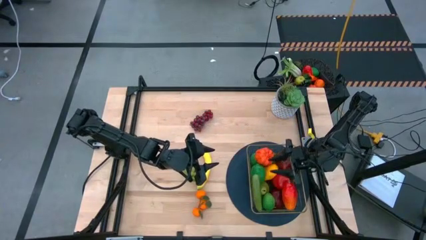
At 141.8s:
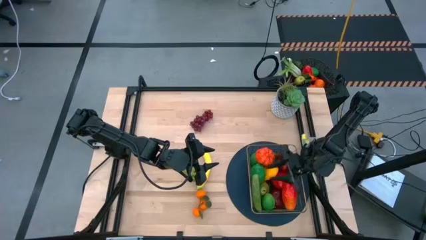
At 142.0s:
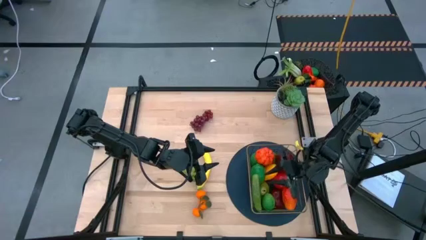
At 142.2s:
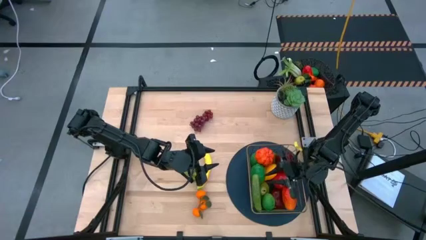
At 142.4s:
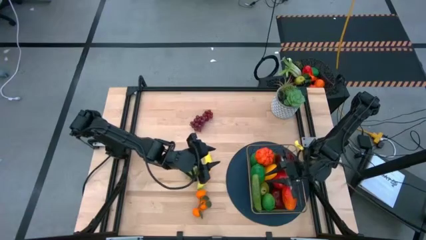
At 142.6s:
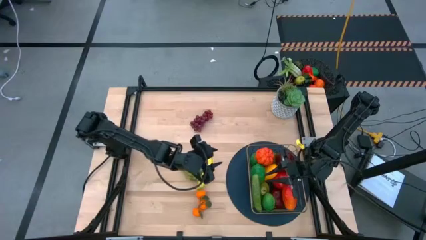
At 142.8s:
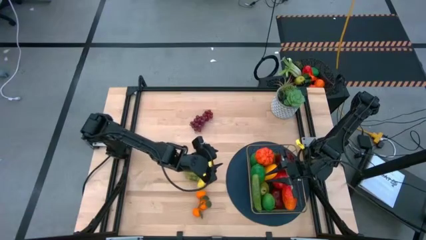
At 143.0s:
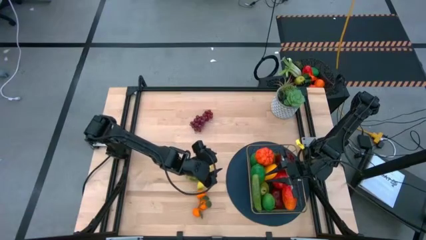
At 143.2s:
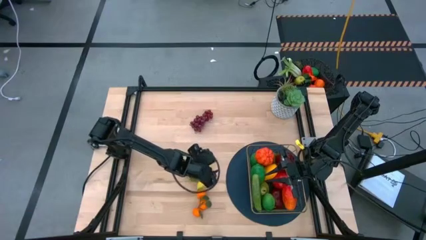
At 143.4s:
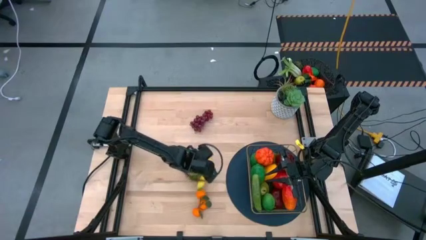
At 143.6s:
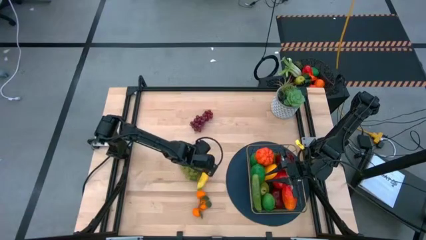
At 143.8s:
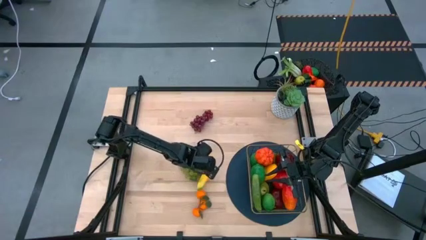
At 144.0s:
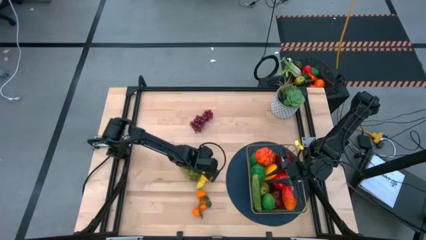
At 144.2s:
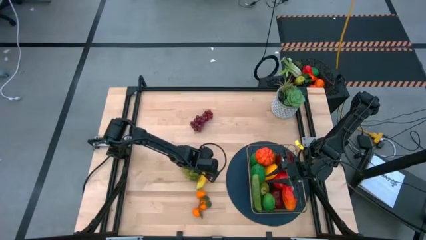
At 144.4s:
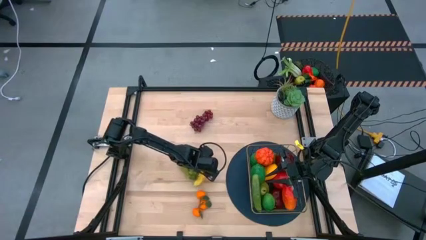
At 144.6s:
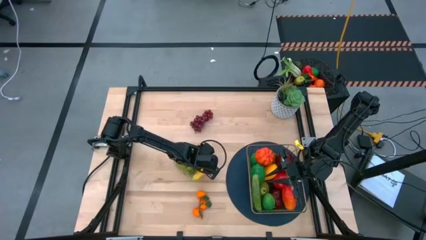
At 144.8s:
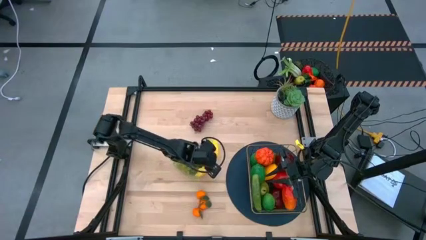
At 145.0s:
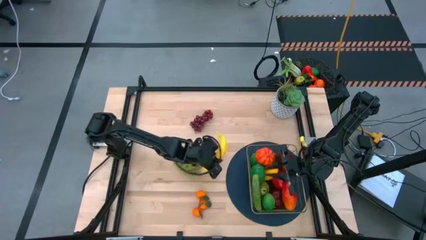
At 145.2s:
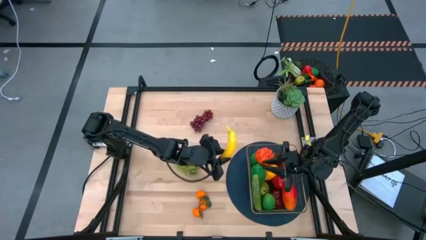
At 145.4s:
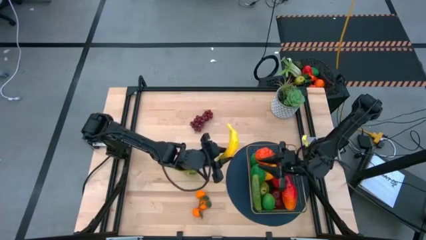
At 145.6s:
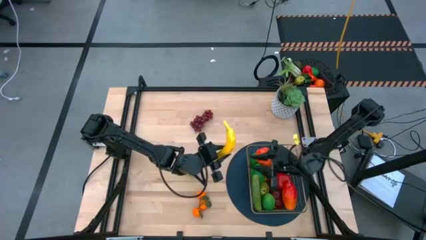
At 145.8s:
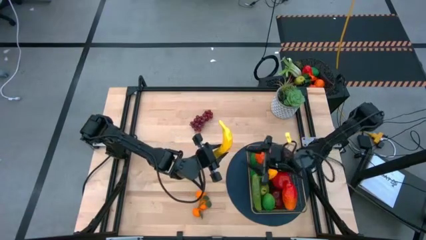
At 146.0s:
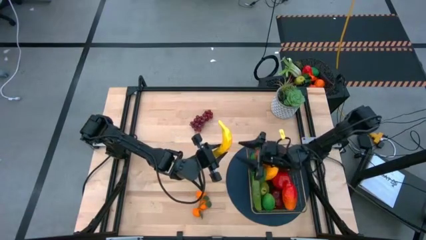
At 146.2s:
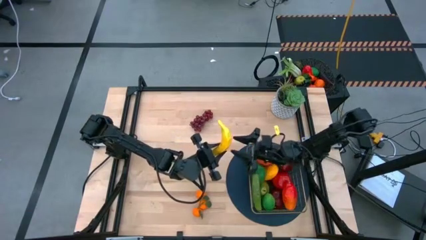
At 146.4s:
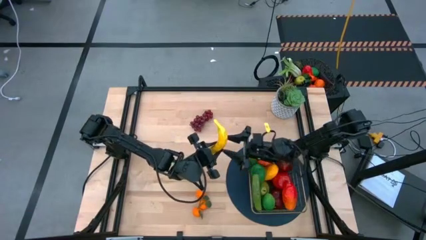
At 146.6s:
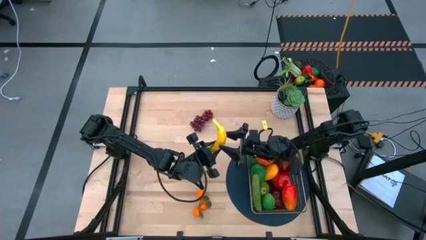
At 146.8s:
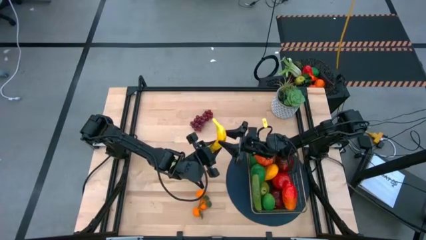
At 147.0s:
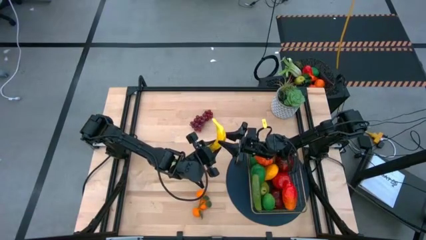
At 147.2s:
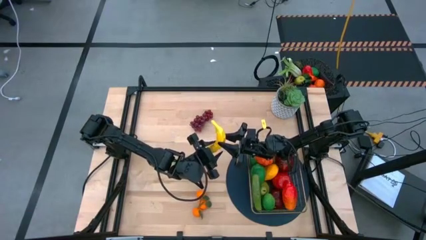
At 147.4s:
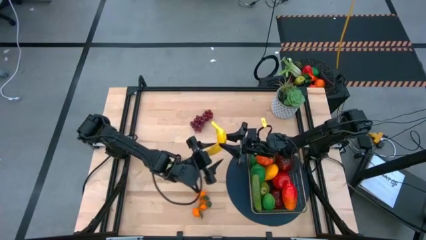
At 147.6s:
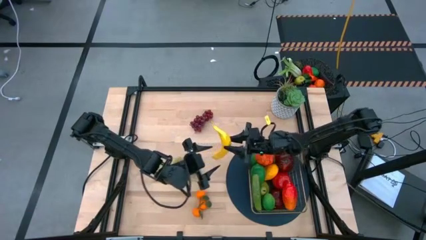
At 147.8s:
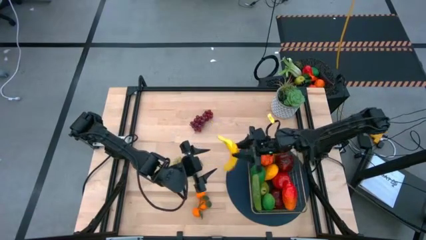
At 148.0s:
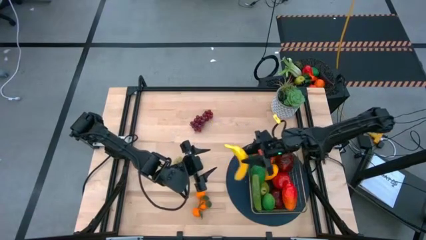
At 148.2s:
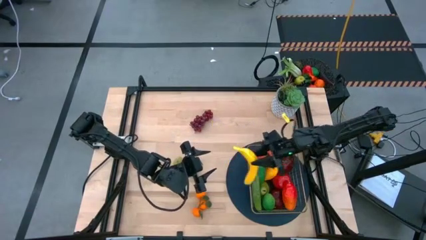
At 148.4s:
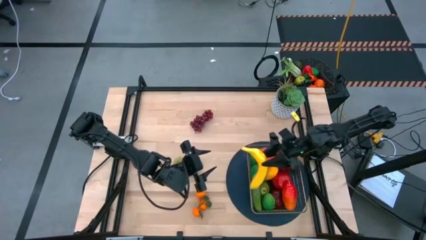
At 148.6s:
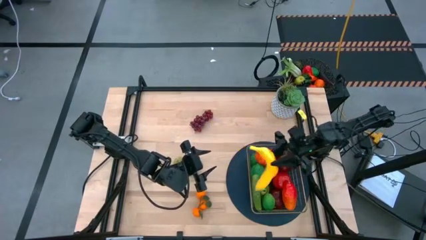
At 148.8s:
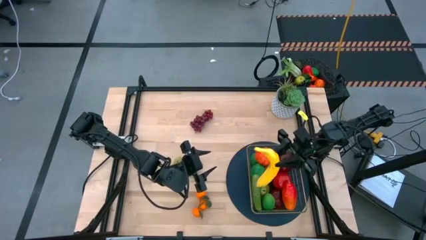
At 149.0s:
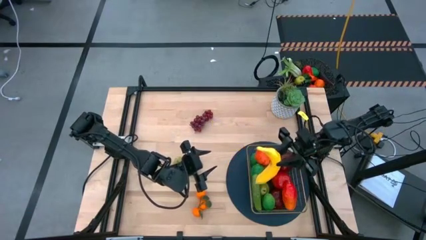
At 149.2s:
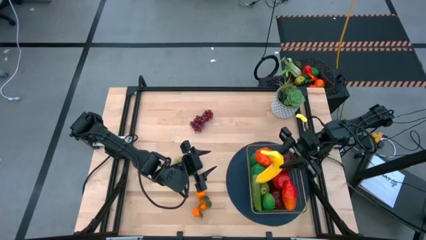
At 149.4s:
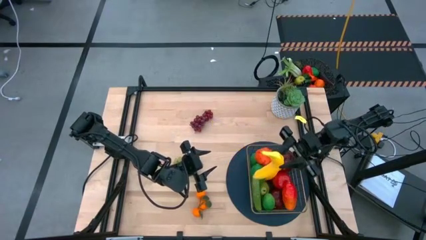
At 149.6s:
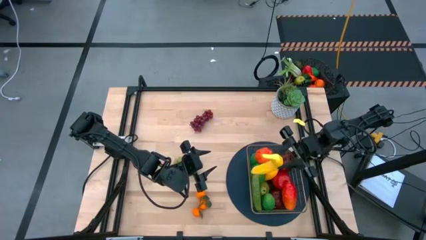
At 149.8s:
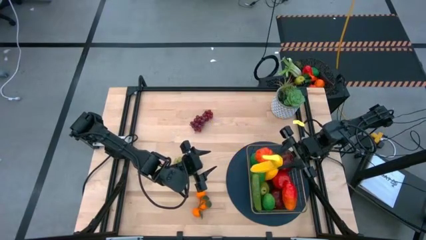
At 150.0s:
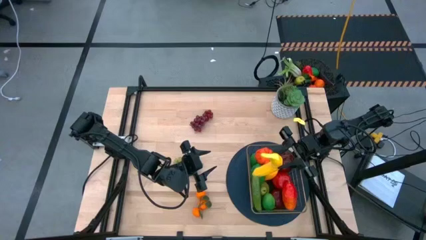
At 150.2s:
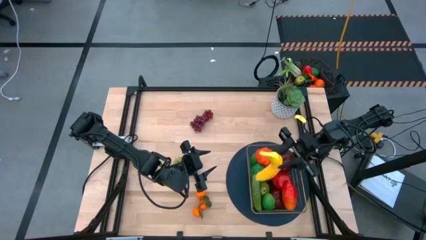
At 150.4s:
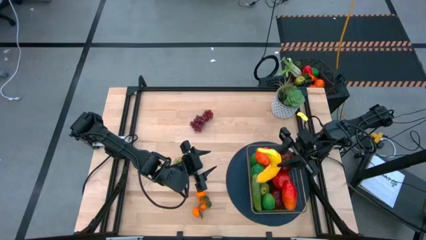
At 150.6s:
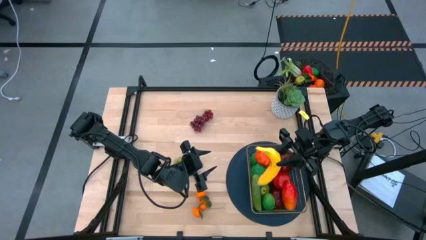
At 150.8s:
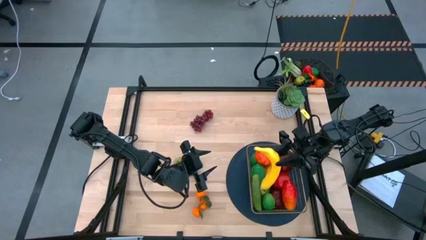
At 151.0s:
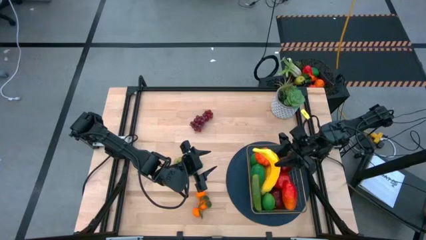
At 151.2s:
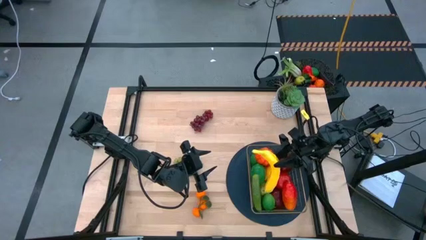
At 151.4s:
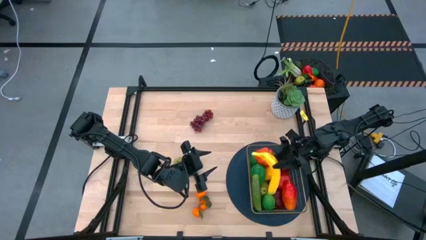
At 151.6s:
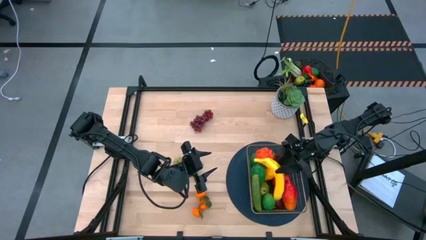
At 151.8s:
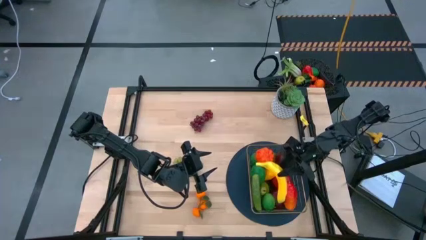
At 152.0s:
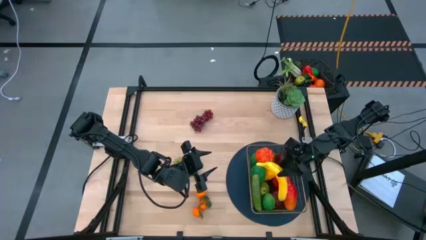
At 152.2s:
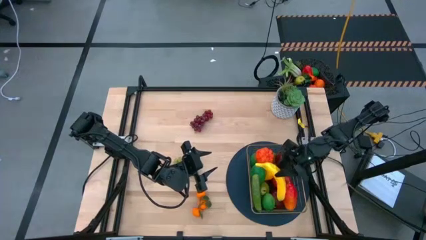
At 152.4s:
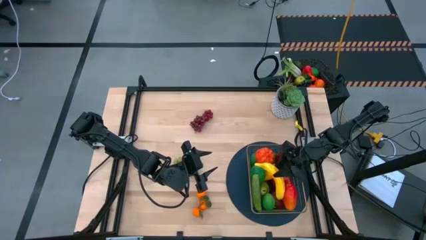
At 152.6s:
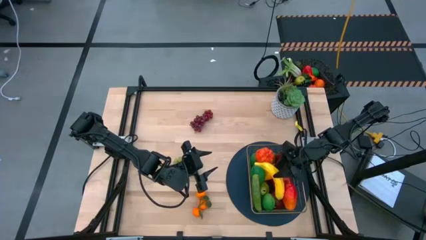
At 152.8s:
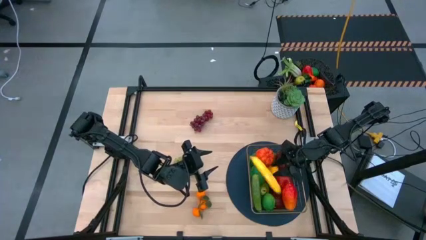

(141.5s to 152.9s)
Task: Build produce basket
Put the banana into the wire basket

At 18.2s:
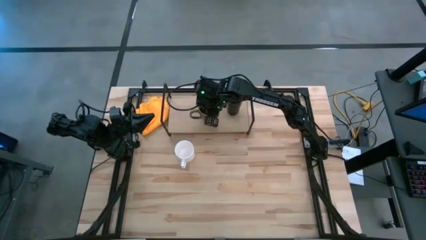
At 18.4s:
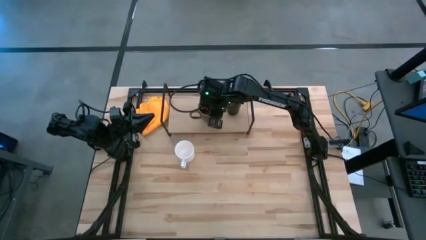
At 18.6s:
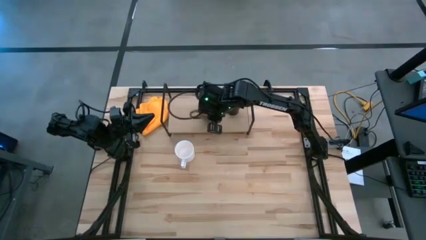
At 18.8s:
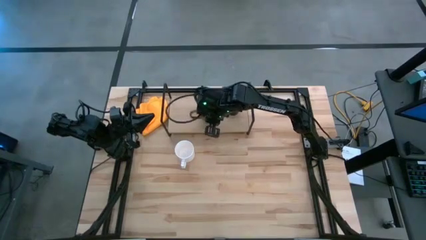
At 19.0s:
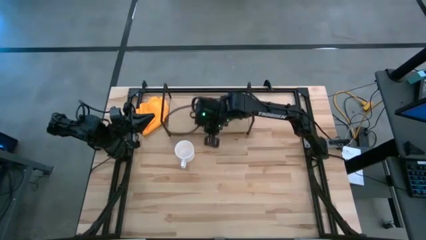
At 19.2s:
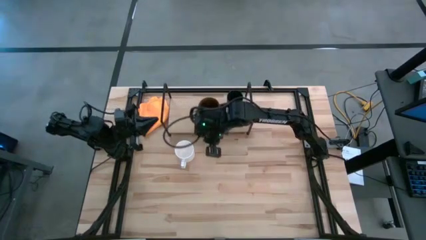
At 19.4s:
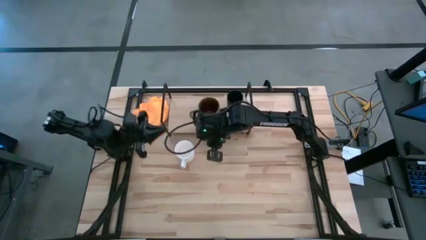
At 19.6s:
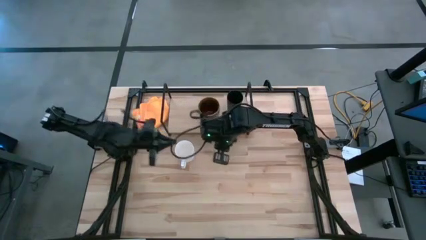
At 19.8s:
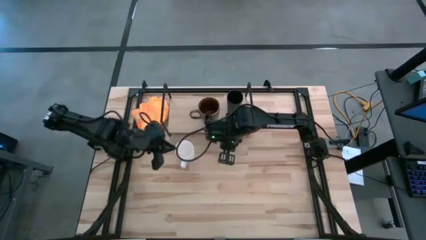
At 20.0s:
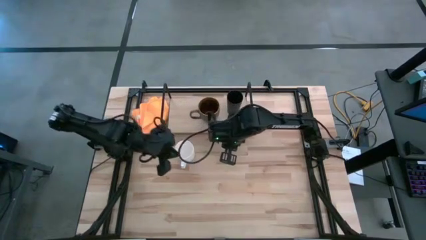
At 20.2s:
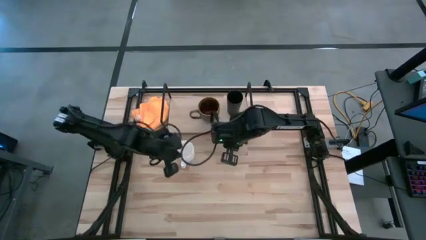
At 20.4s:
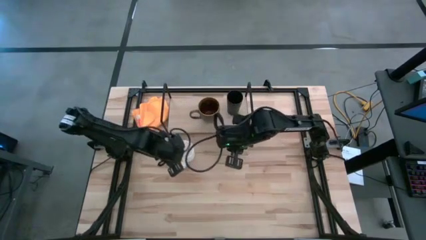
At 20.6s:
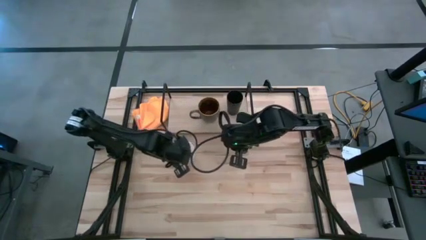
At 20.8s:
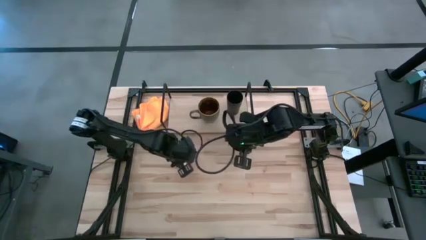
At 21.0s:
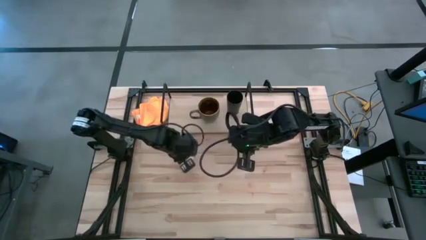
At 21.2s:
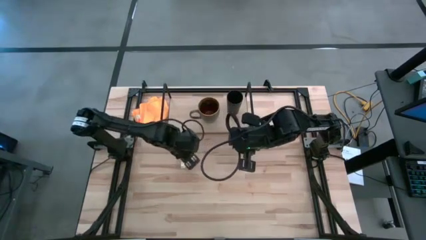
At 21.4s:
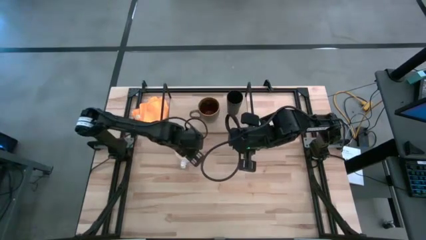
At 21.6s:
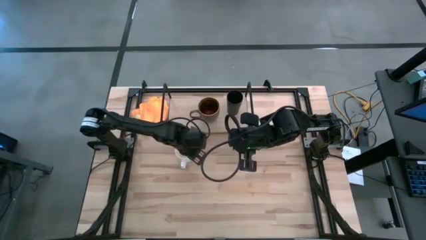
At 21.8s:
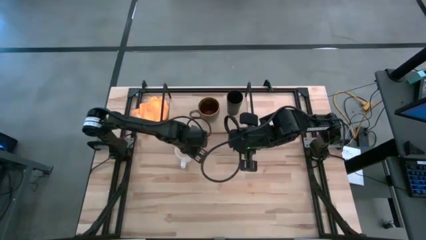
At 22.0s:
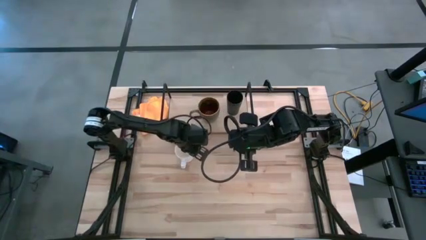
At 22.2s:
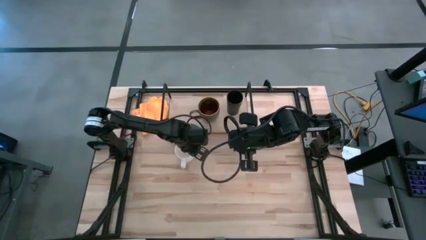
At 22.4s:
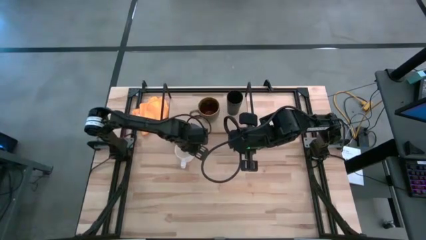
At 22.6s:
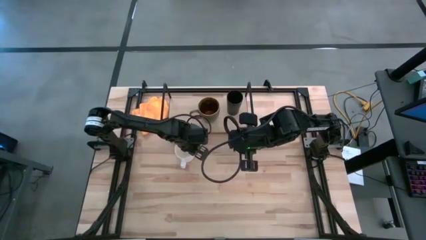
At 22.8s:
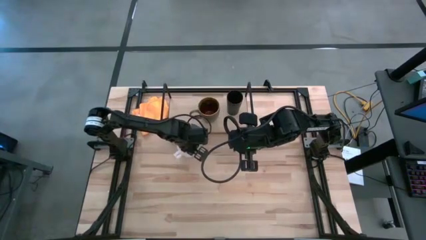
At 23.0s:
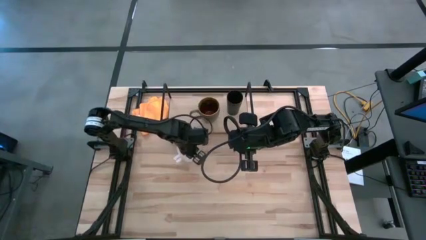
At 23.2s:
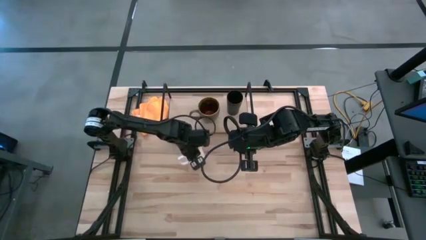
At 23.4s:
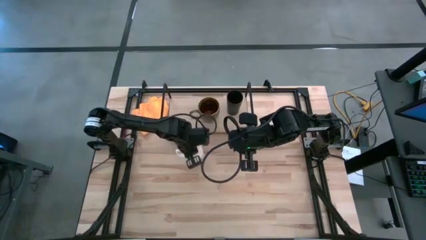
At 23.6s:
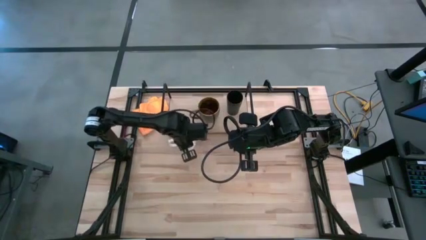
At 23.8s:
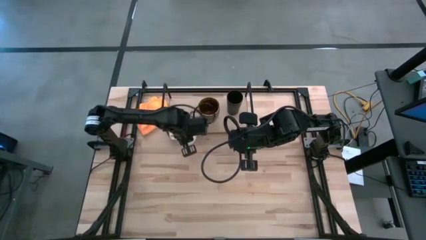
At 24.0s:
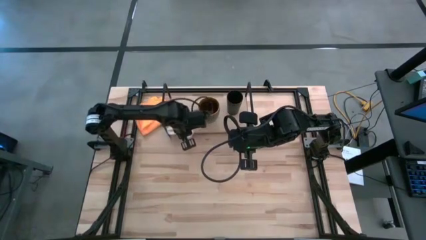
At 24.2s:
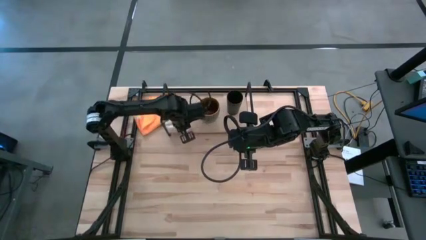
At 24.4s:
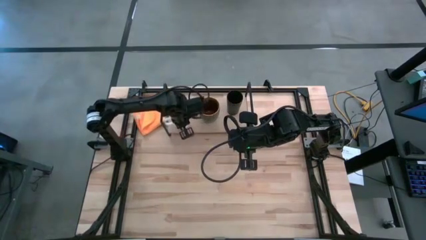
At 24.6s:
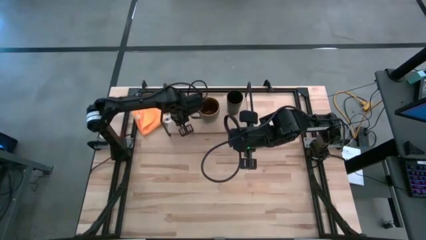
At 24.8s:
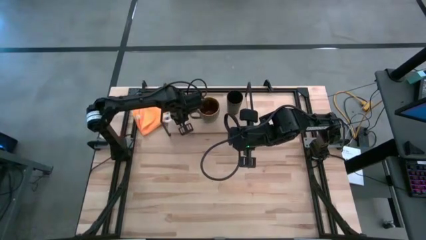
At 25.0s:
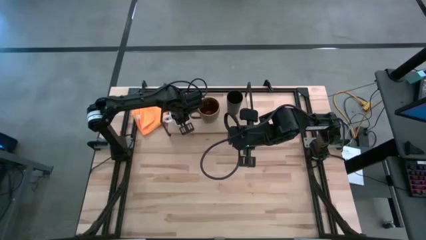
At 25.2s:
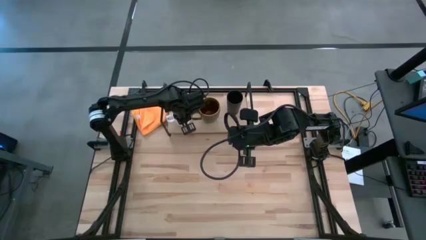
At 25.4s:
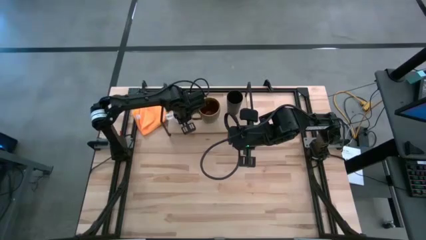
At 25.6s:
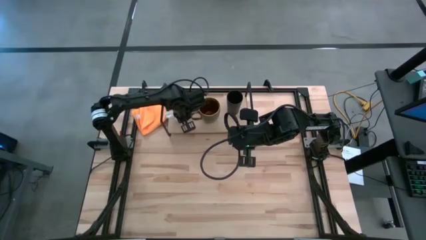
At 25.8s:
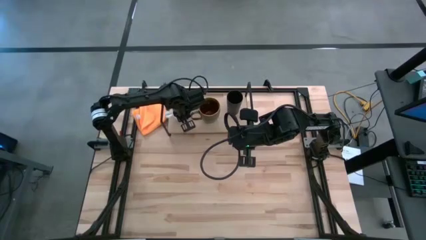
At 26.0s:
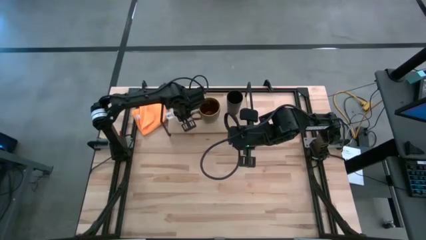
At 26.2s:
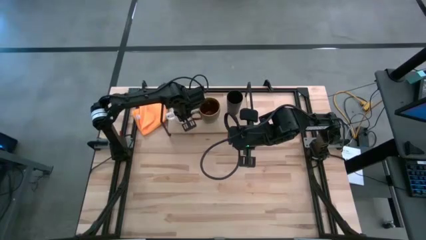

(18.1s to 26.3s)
Task: Stack small to large cups/mugs on shelf
Put the white mug on the shelf
